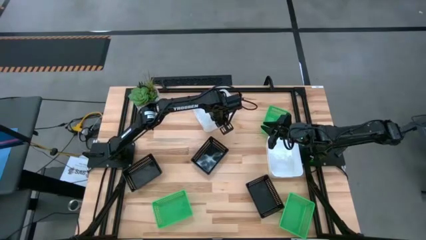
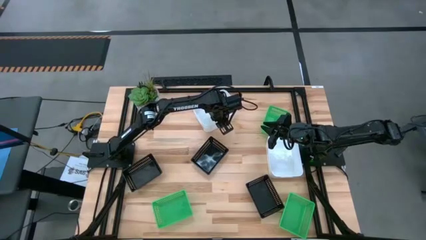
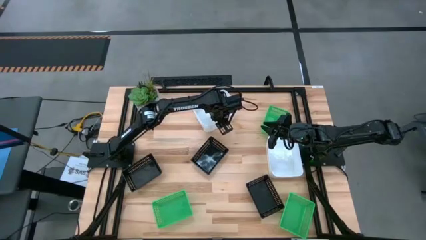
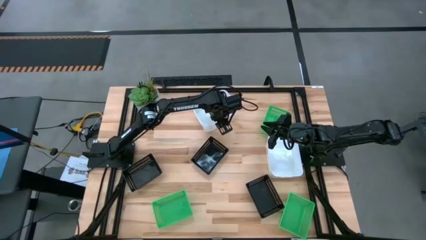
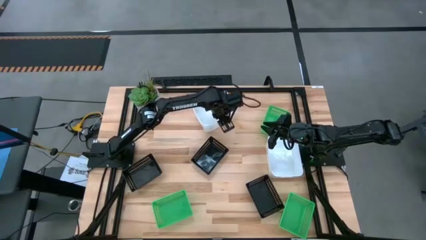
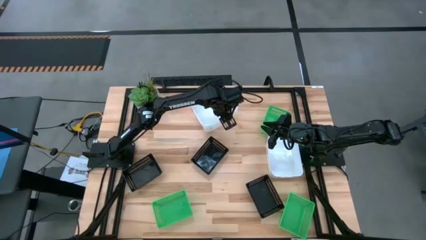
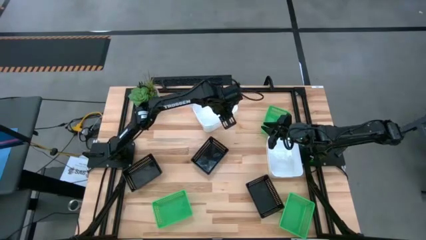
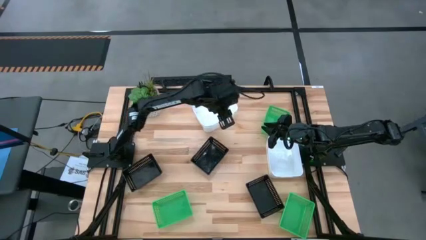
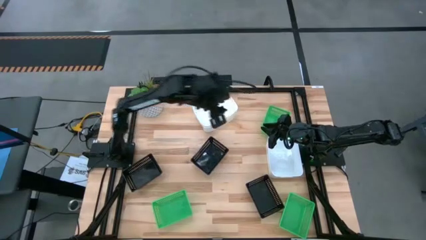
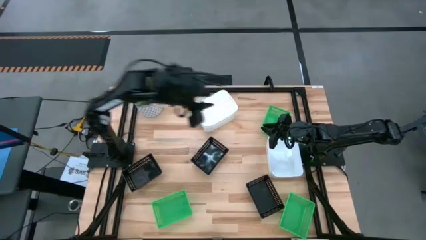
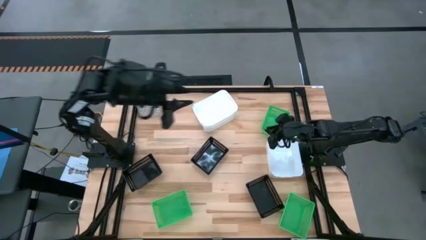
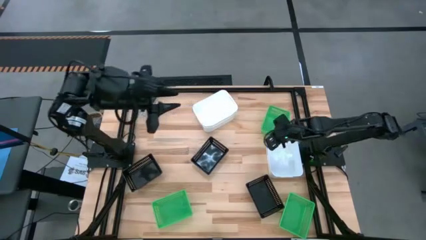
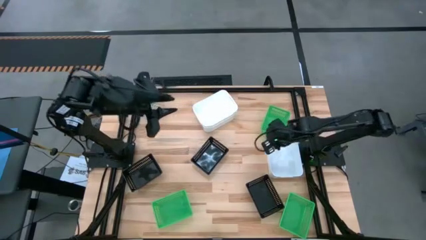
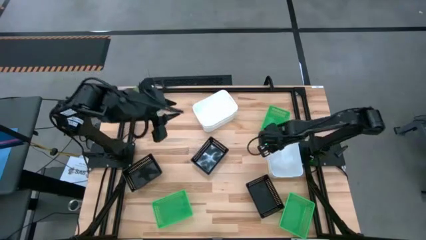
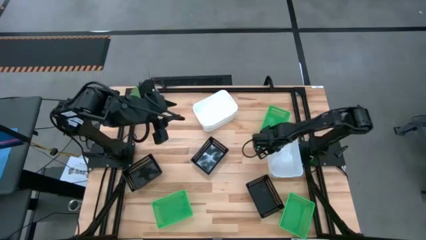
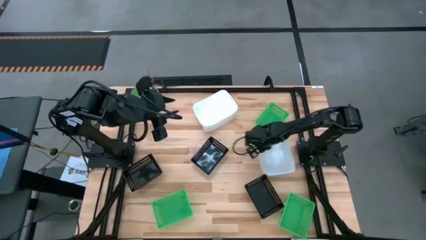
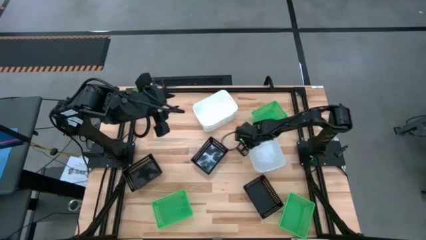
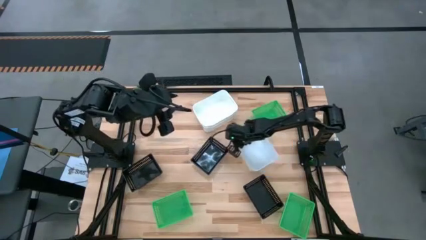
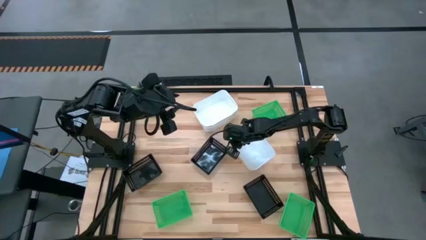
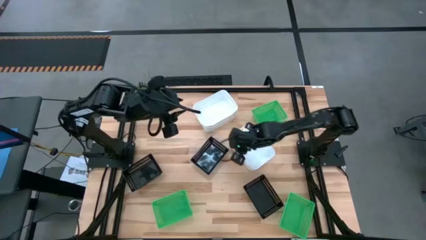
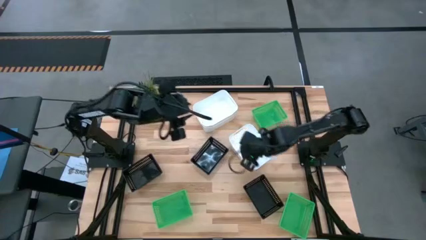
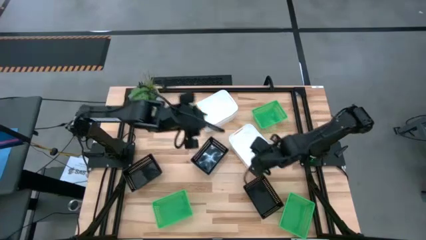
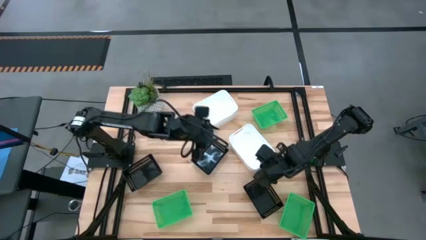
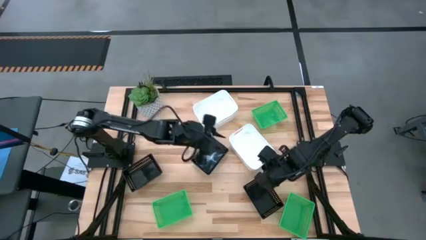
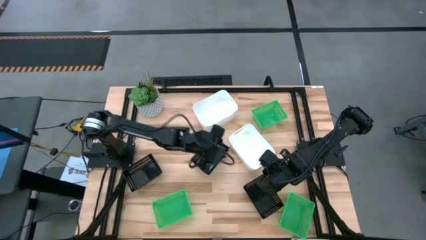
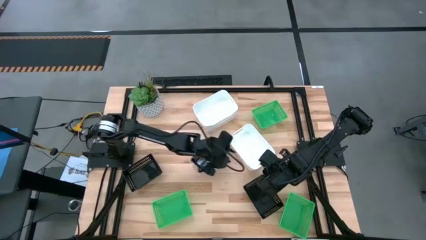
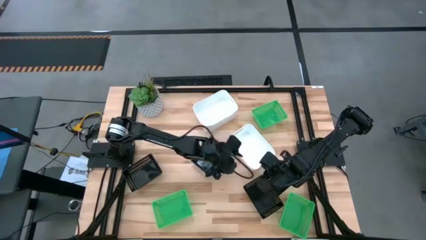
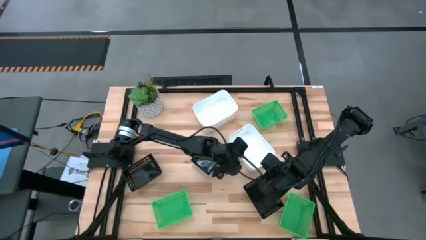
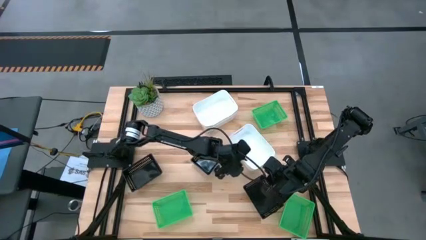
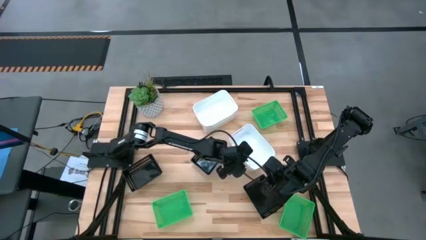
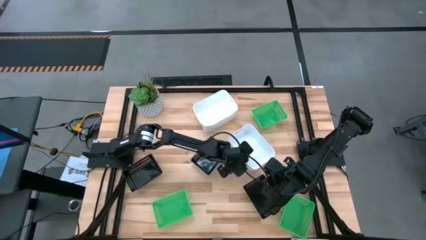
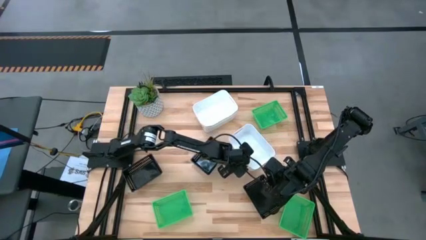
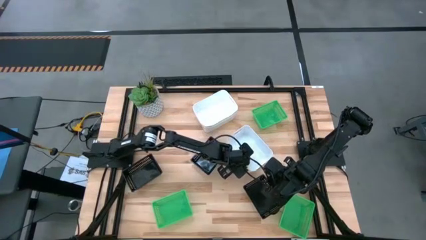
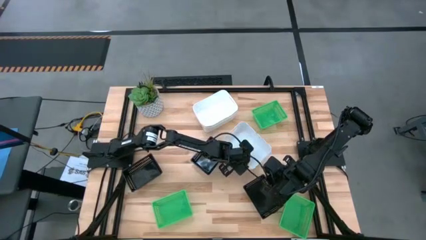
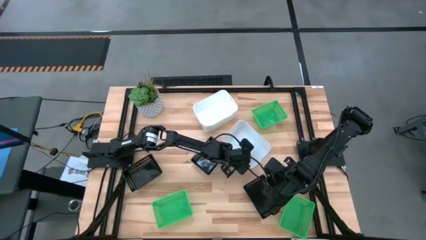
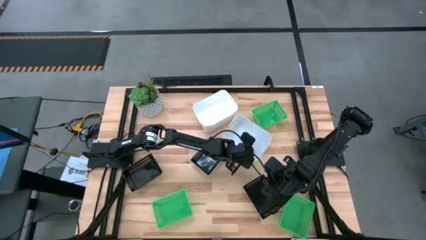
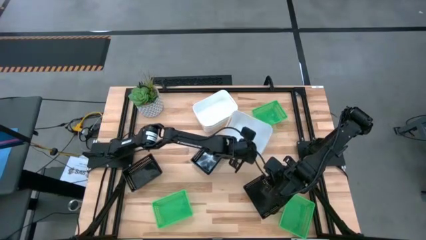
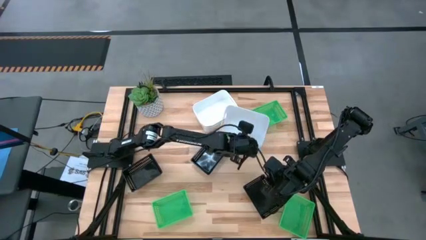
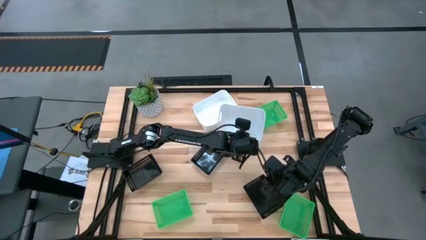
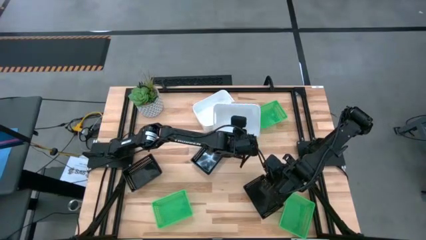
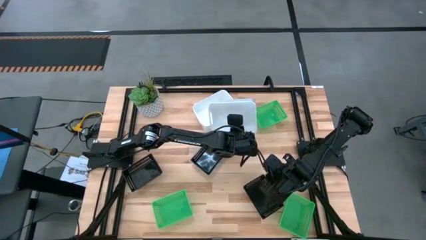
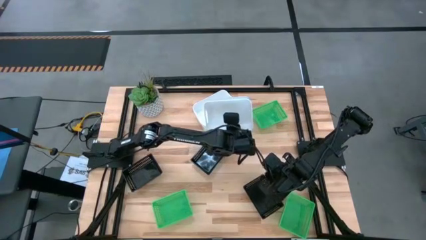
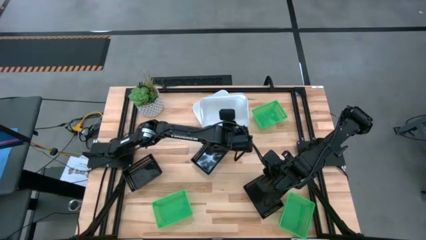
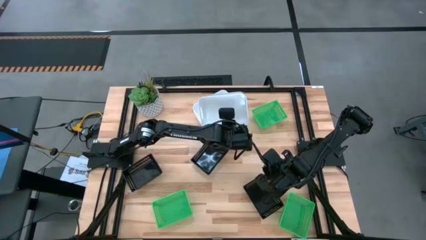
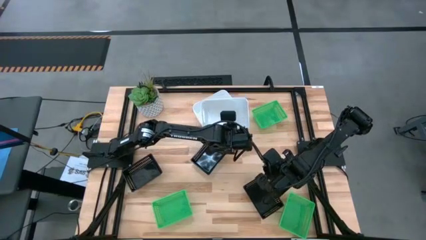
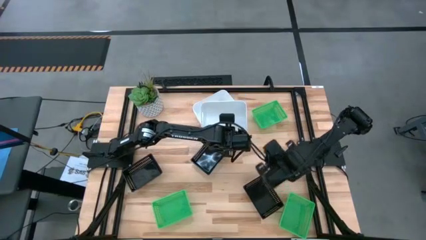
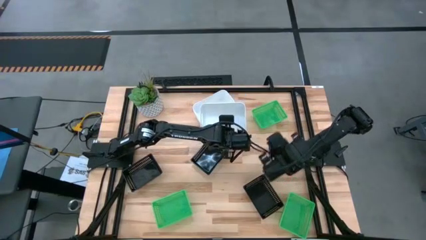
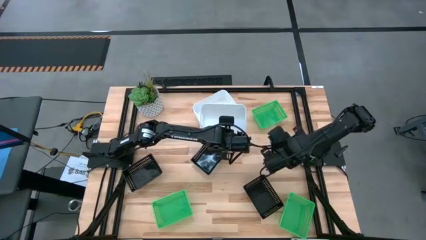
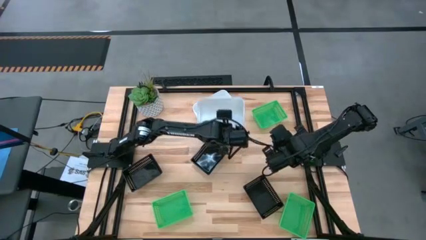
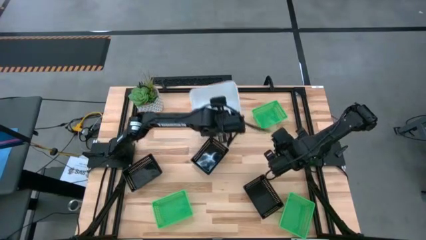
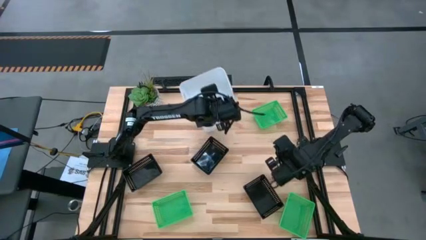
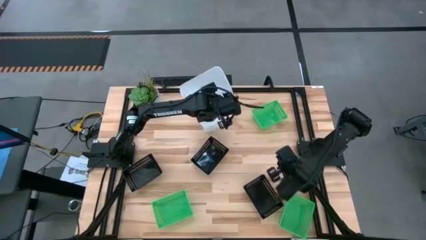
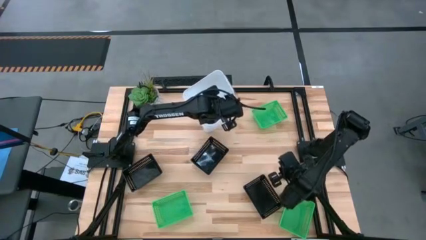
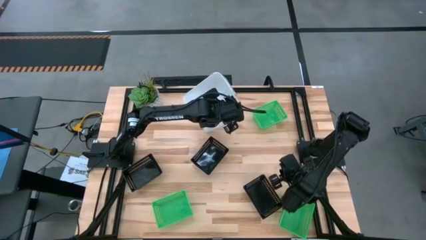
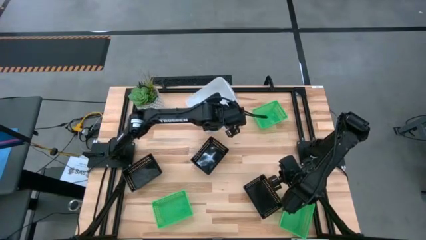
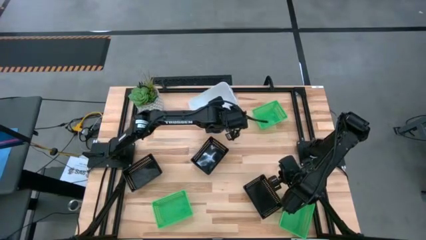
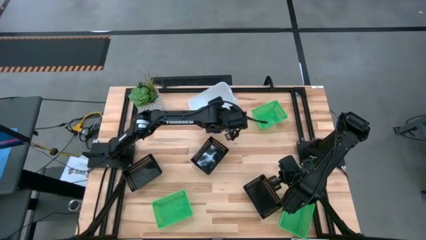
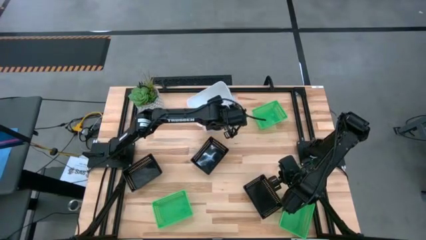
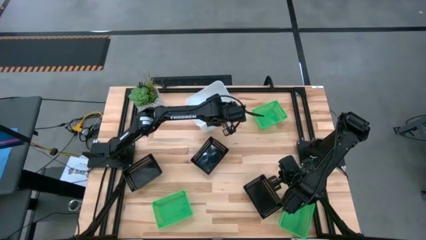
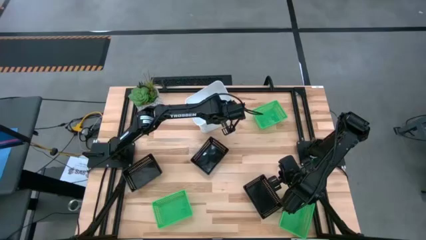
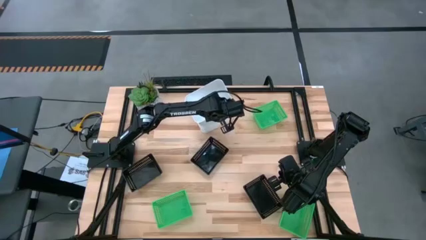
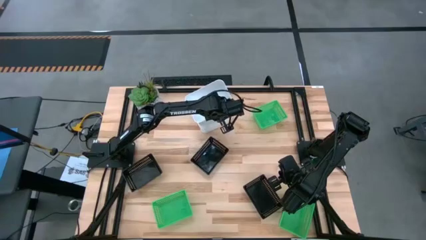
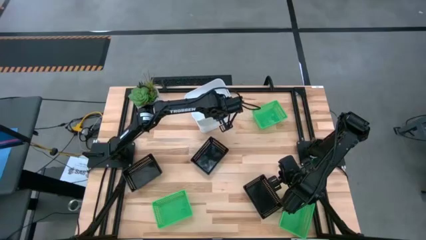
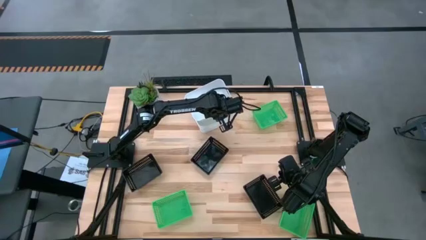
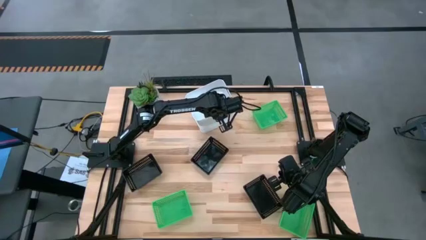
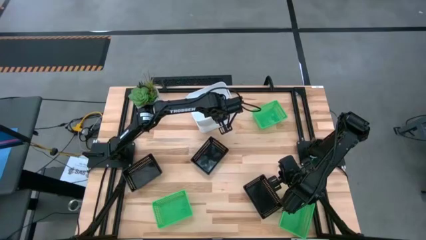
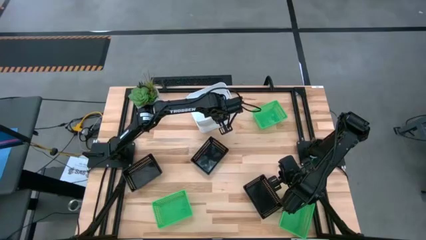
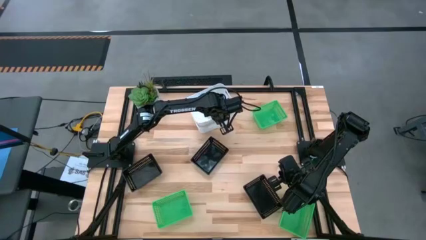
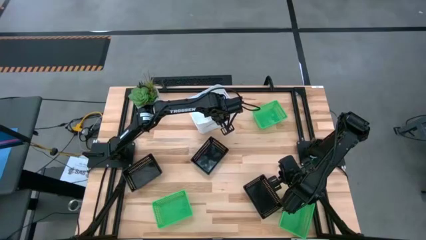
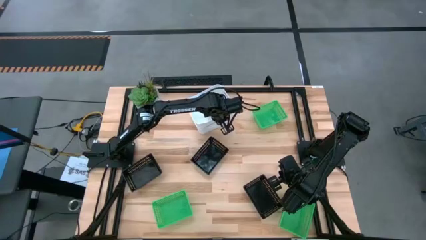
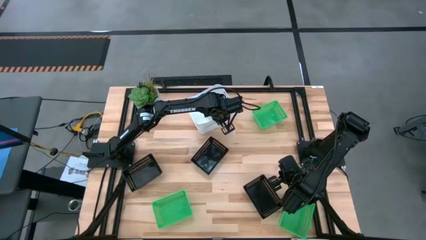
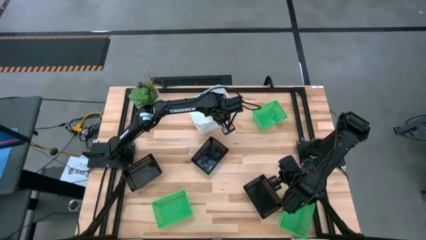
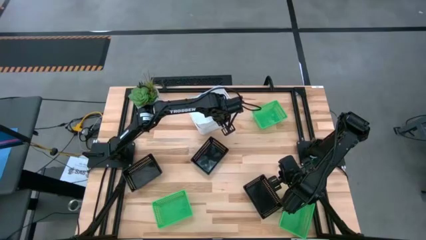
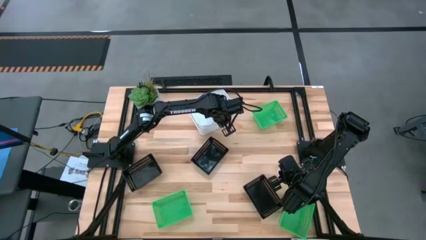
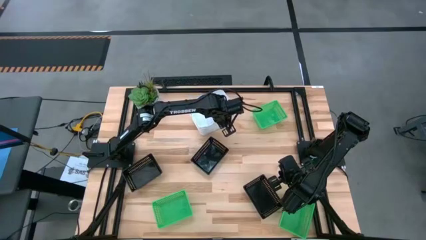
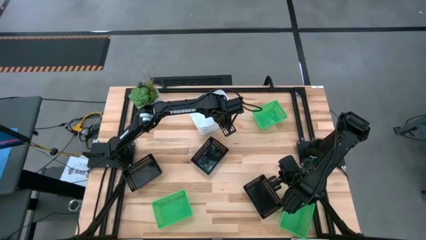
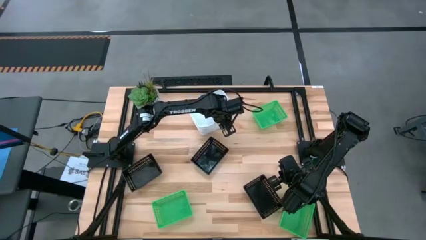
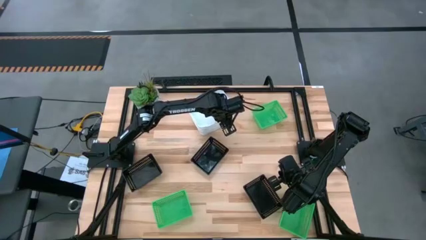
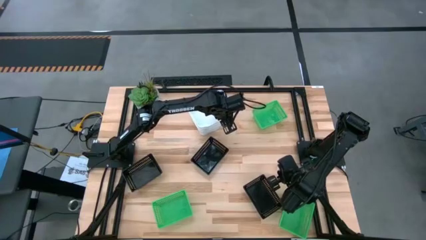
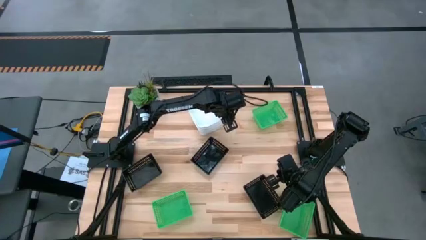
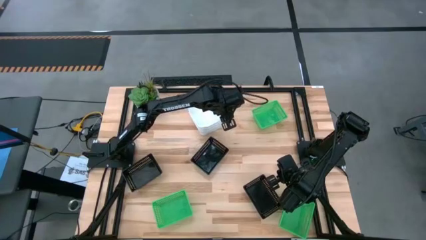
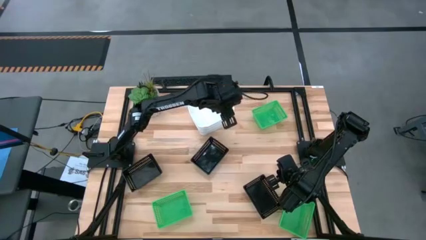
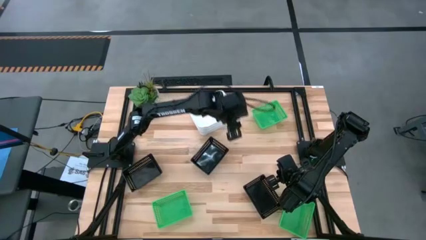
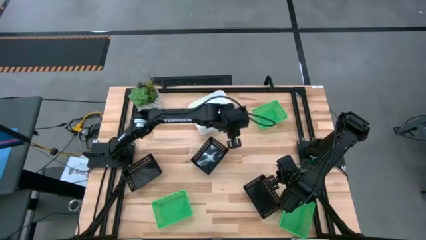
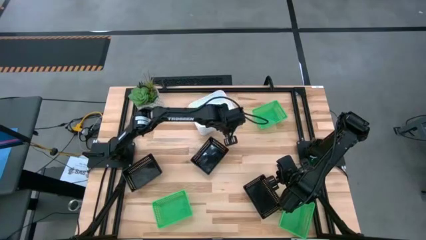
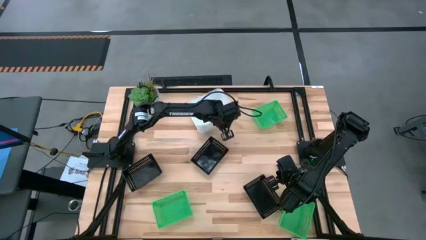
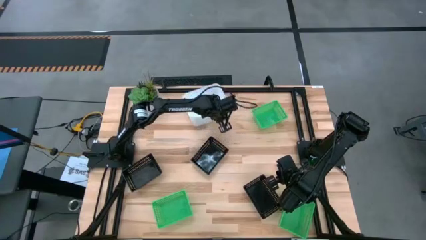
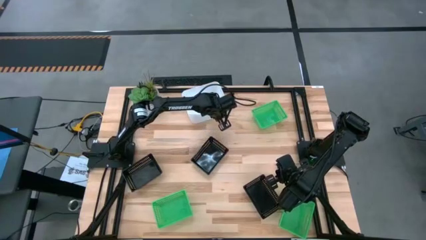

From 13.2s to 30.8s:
Stack the bottom white bin on top of the top white bin
